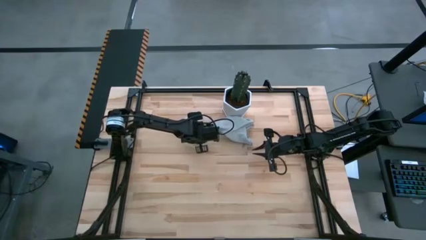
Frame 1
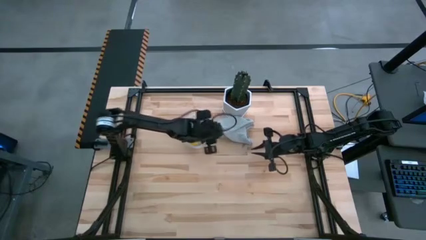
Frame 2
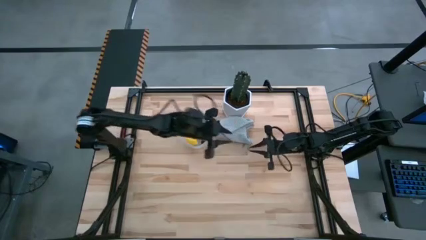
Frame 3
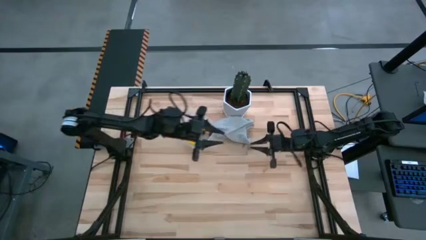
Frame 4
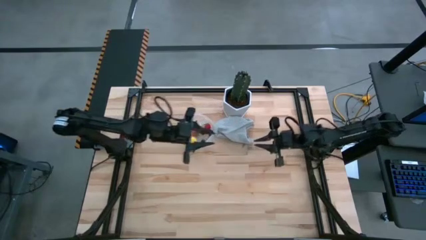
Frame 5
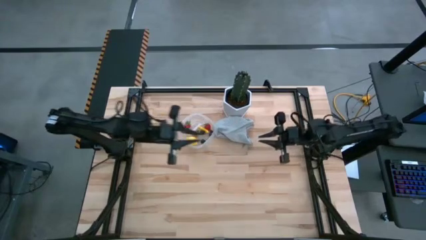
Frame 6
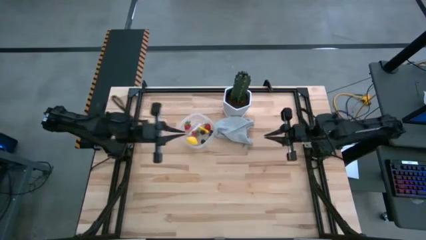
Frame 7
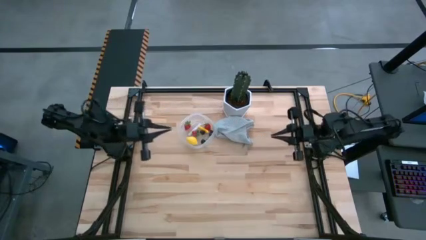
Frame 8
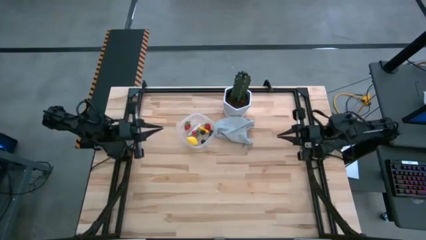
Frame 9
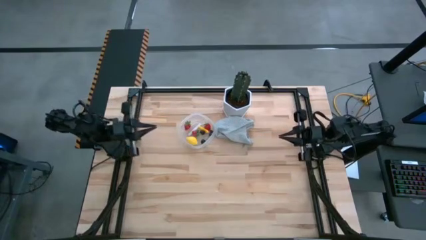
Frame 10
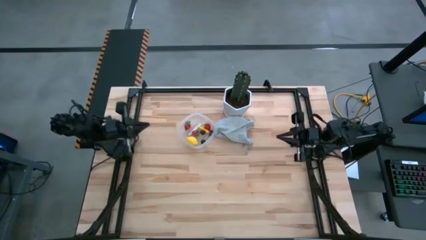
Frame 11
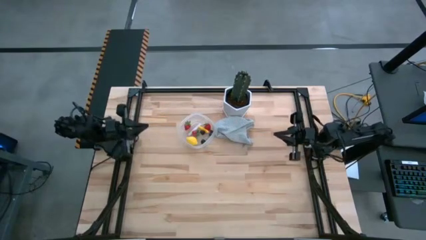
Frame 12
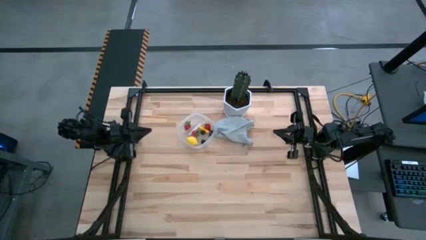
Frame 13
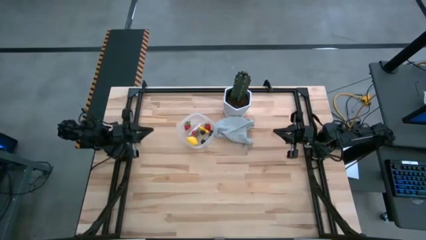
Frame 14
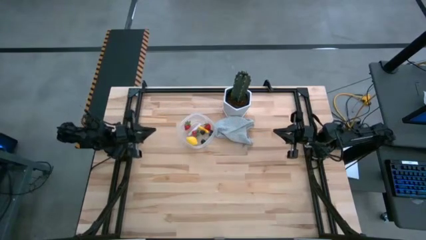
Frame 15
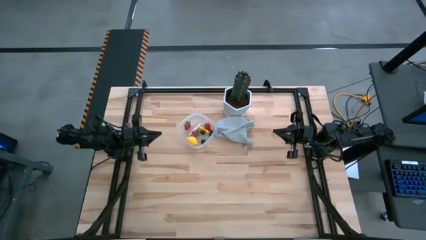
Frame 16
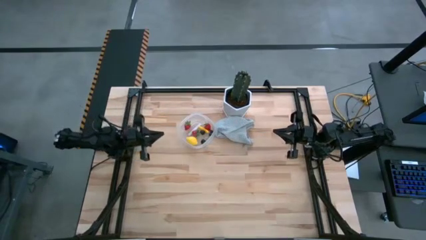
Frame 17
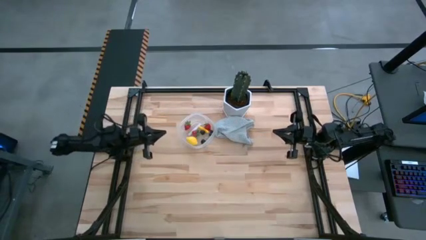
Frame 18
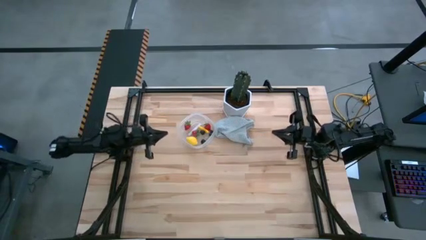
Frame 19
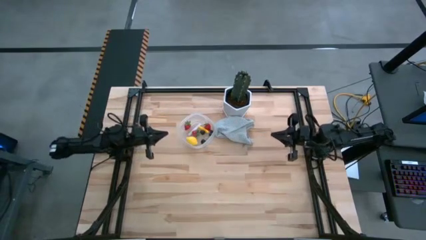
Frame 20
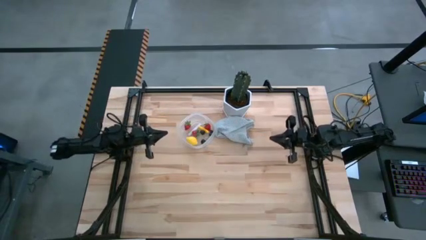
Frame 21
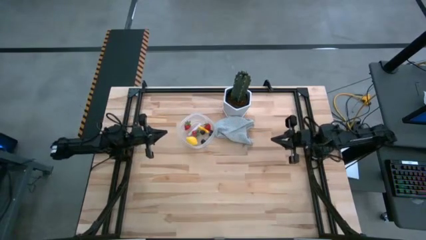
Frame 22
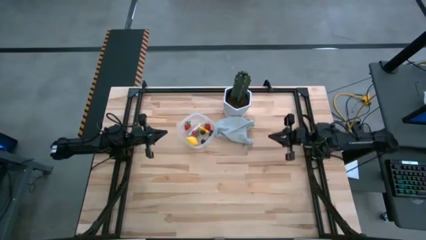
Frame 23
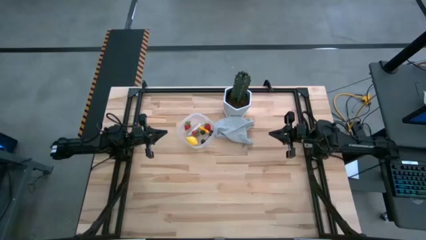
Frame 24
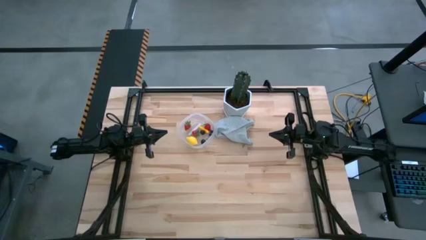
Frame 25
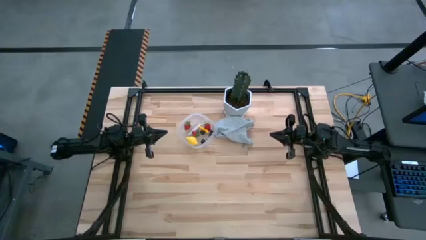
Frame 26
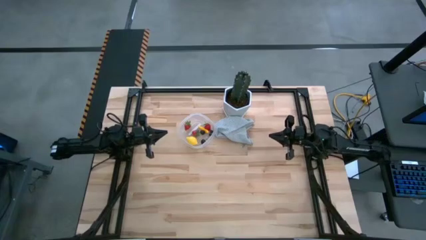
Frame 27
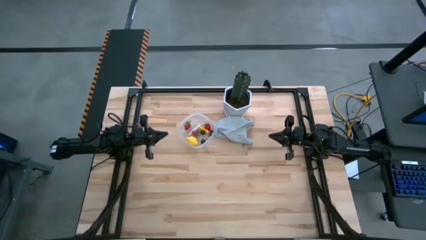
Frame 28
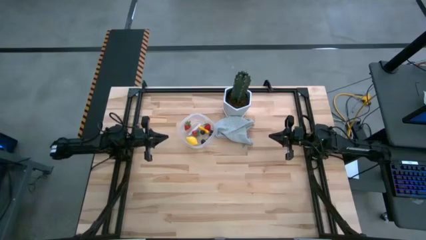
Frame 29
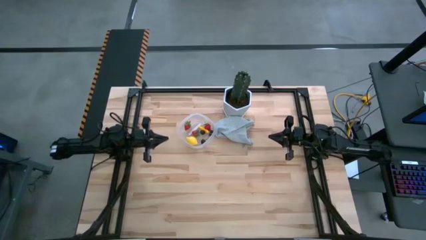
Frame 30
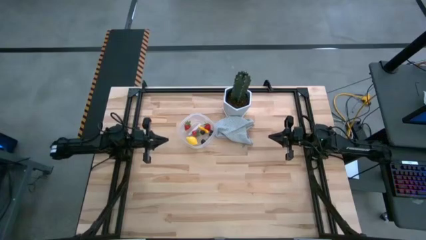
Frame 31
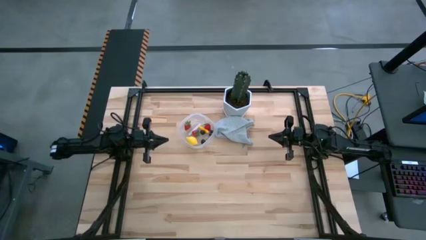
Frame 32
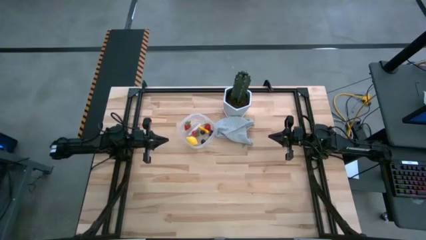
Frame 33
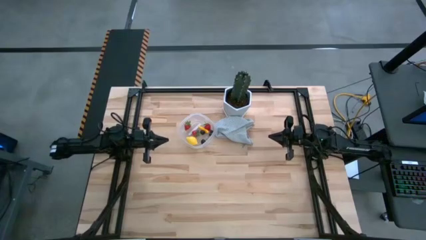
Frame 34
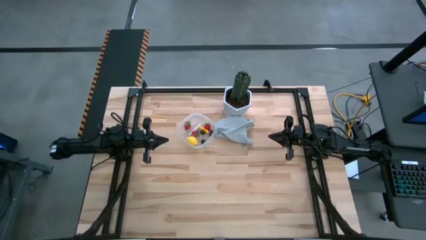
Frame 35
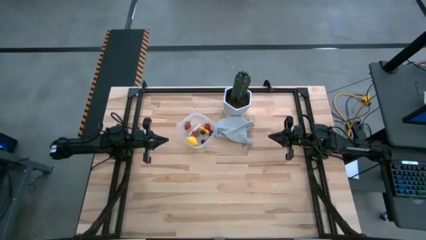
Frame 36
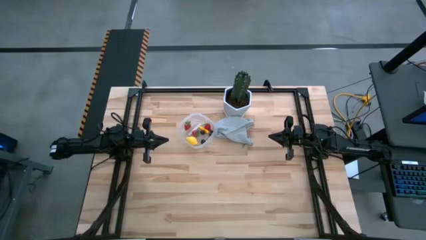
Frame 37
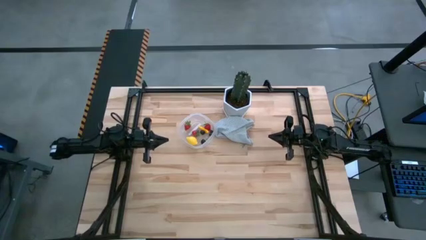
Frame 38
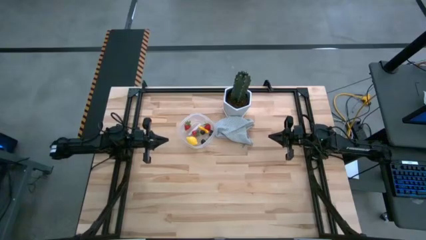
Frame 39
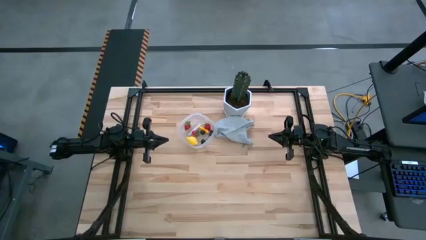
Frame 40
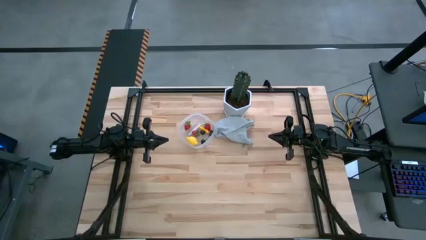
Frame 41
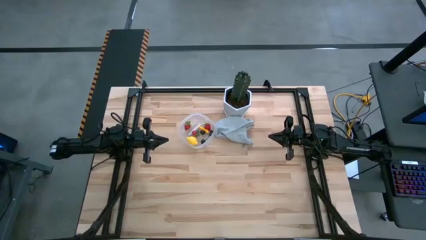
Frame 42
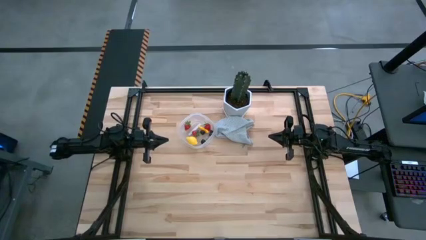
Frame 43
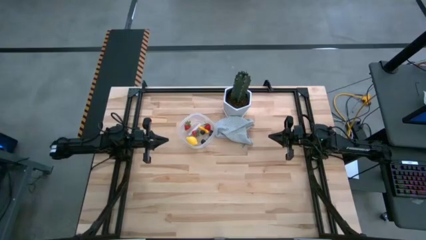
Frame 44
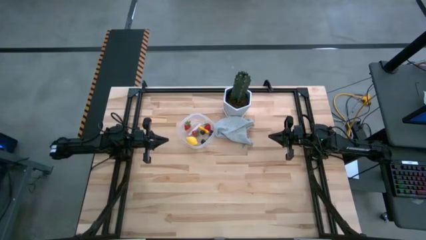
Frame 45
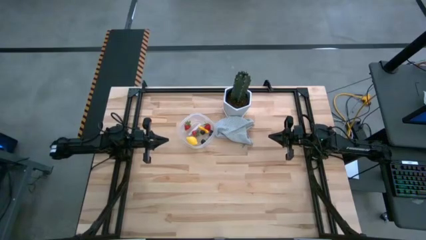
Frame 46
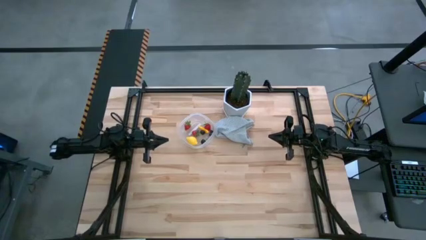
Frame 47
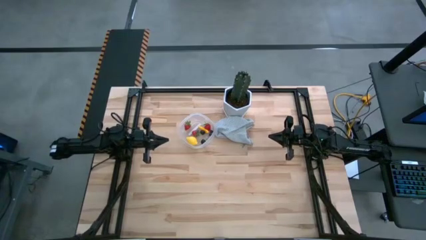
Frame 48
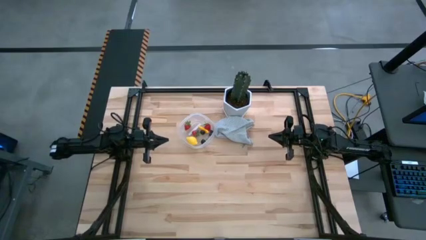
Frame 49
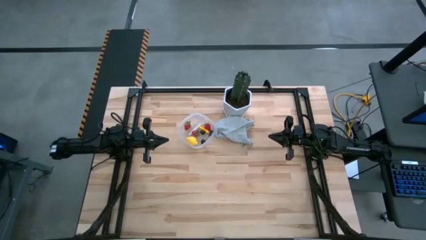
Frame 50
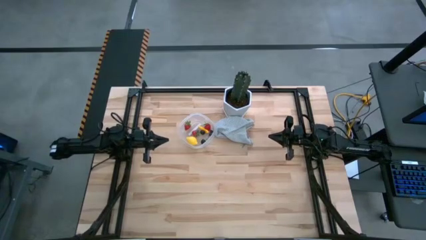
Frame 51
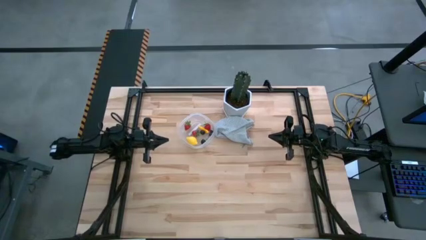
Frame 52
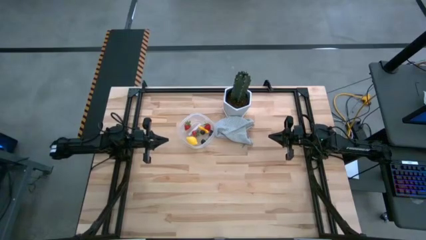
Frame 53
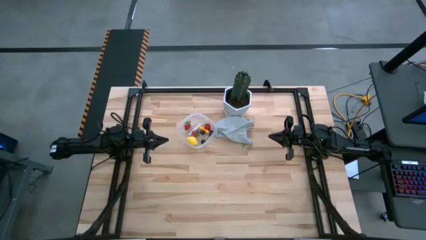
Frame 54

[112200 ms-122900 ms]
Task: Pick and placing Produce into tupperware
Return to Home Position

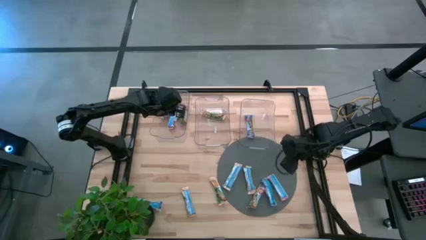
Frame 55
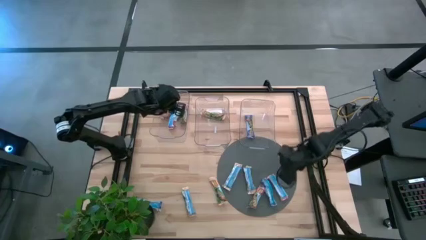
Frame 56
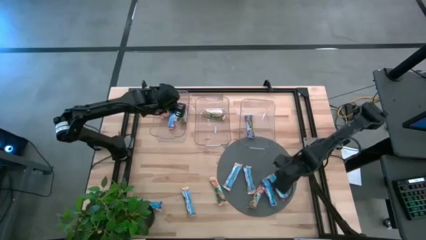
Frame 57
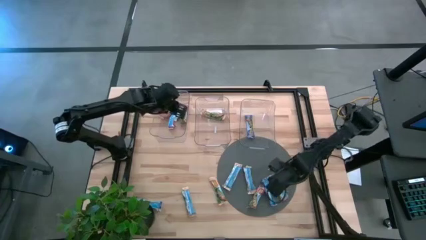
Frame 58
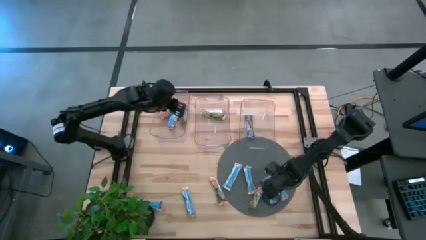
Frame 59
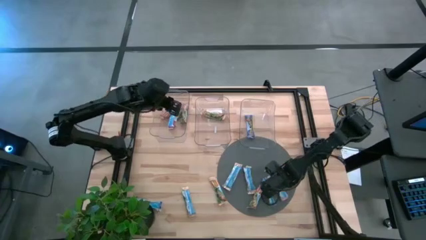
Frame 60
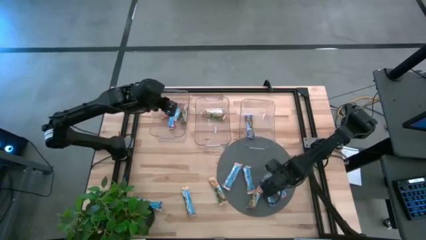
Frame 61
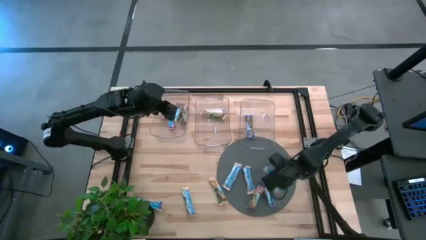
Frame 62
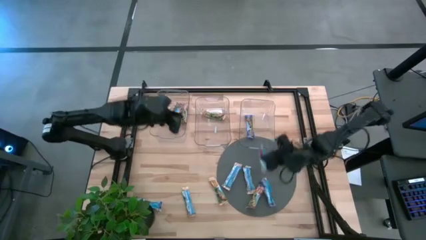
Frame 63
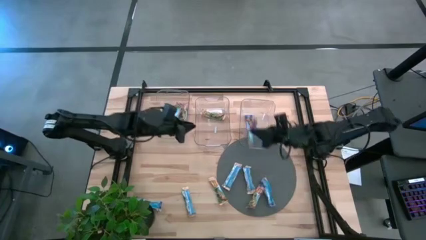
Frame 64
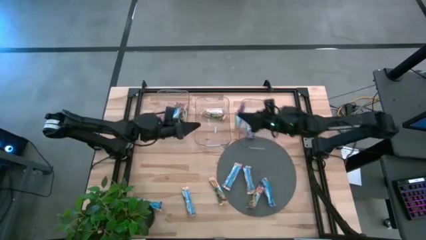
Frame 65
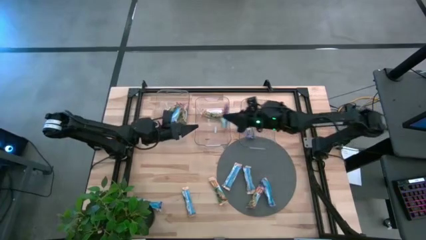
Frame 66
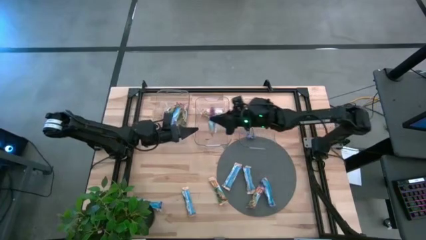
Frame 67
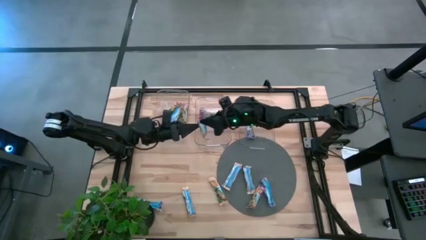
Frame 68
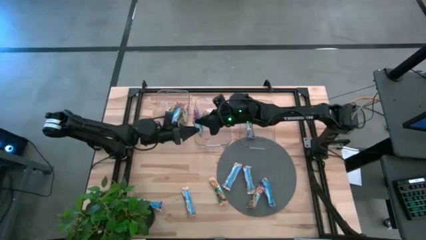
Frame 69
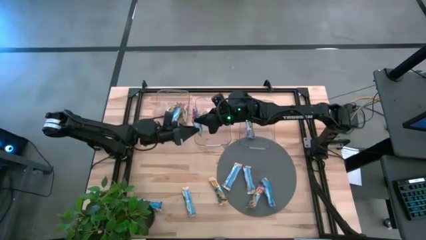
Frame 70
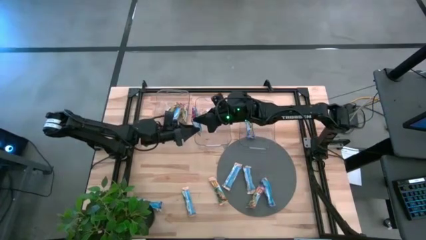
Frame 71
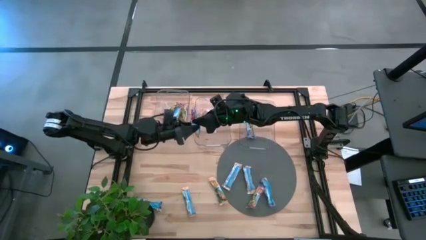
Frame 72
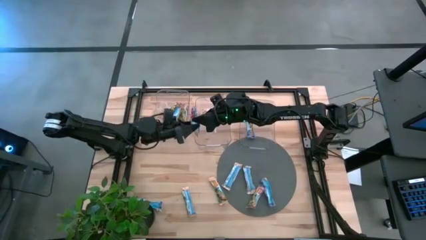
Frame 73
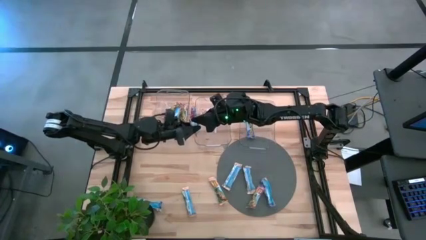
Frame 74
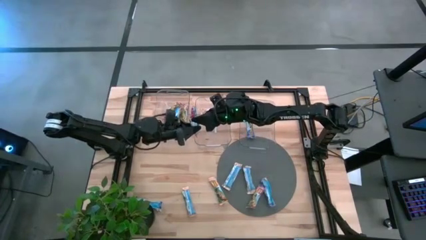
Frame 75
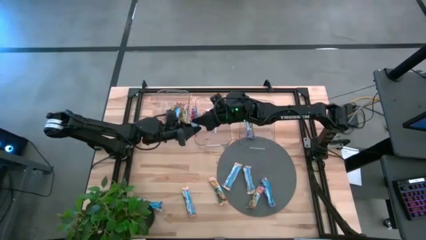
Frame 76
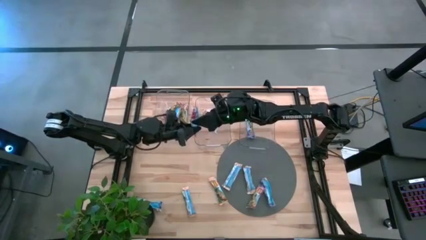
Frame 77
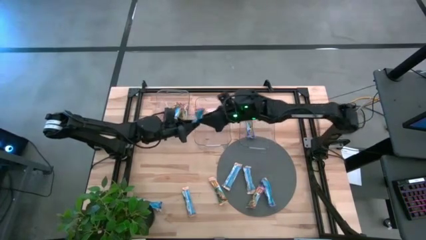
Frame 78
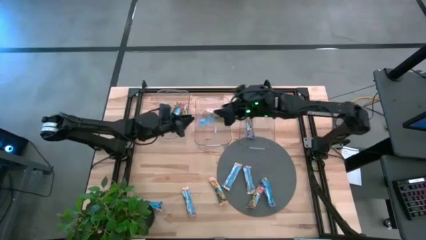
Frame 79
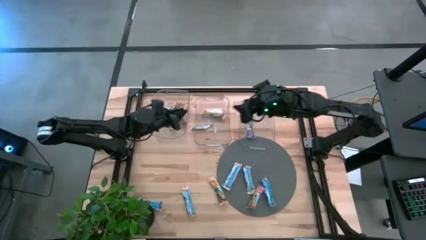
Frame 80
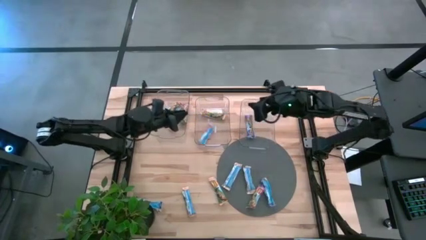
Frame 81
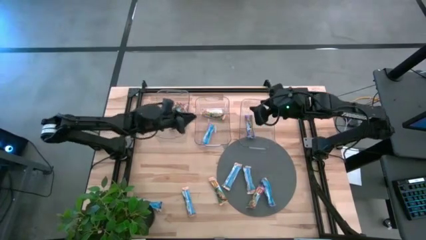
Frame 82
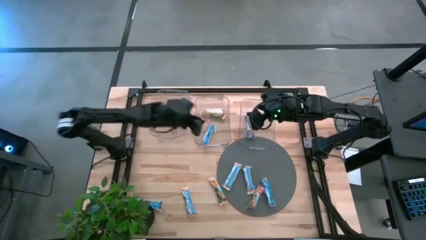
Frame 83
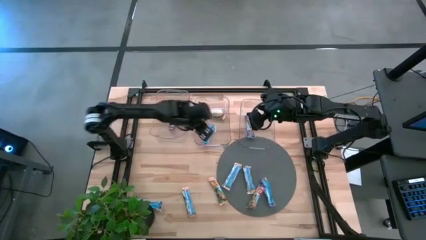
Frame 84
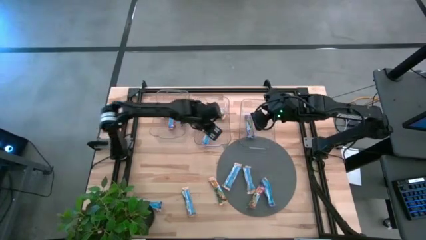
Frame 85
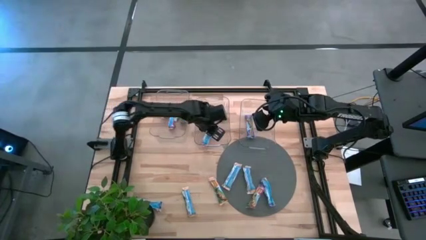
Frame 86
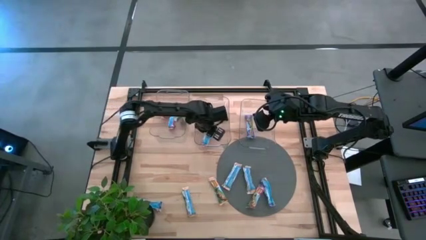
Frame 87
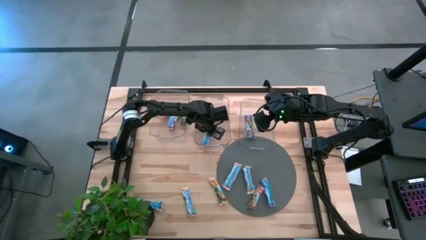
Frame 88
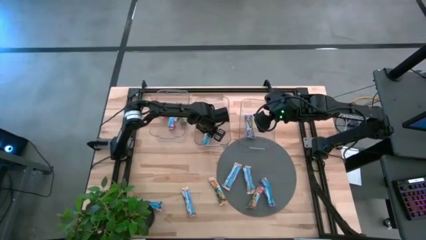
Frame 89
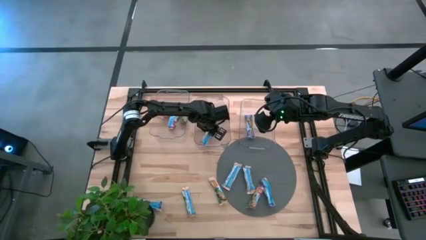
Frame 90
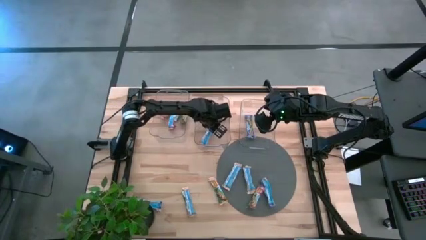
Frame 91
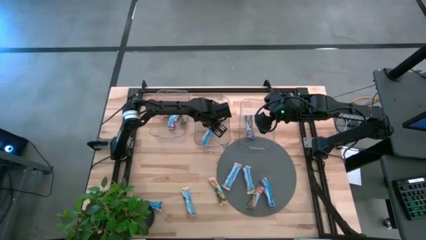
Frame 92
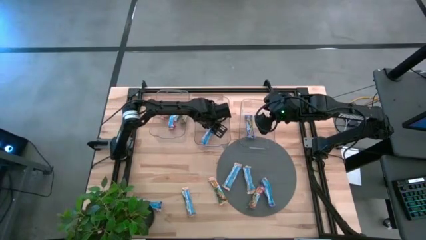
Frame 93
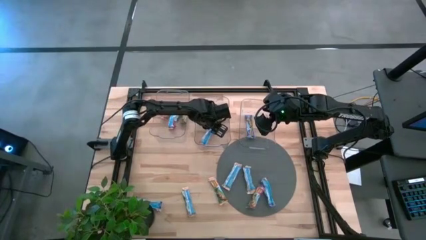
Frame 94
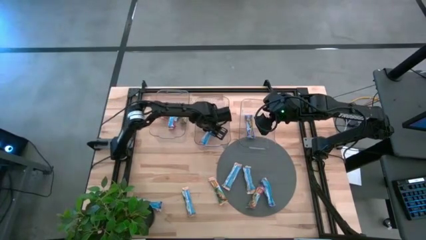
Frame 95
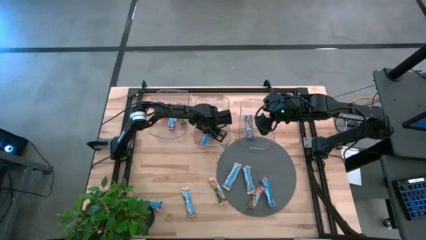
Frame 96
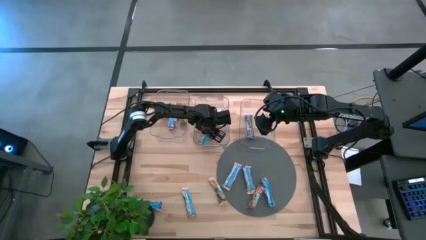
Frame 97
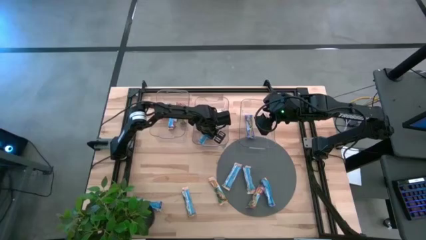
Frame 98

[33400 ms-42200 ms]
Task: Pick and place Granola Bars by type
Put the red snack bar into the left transparent bin
